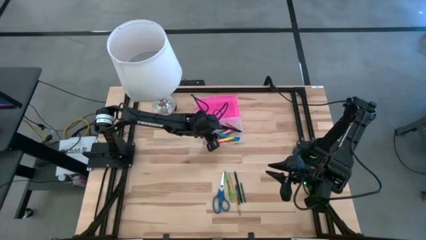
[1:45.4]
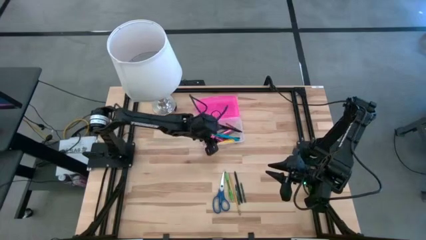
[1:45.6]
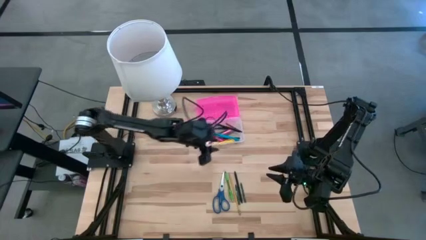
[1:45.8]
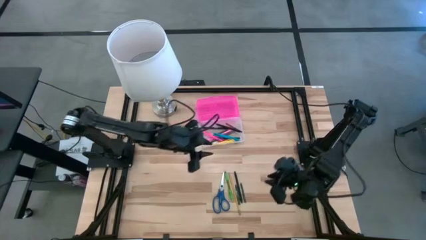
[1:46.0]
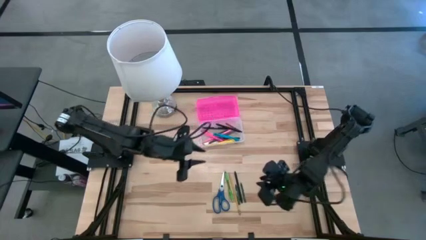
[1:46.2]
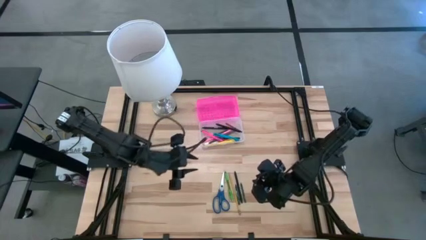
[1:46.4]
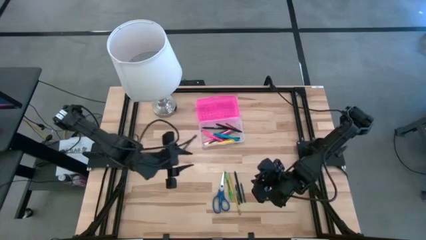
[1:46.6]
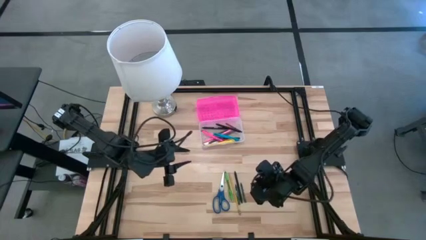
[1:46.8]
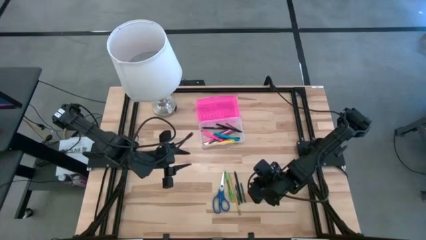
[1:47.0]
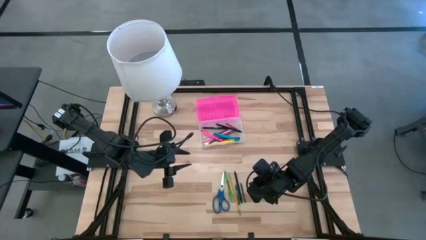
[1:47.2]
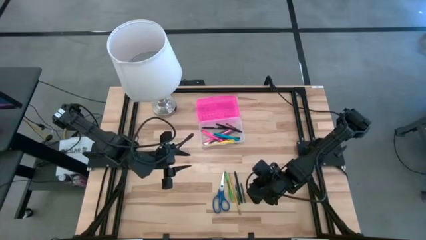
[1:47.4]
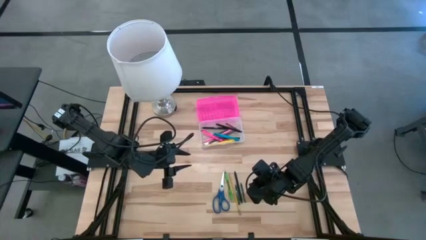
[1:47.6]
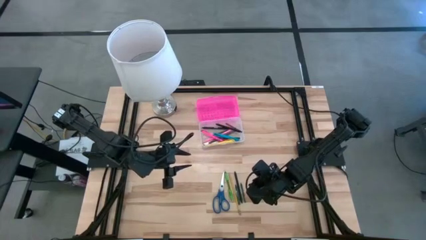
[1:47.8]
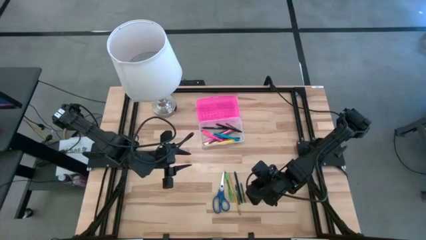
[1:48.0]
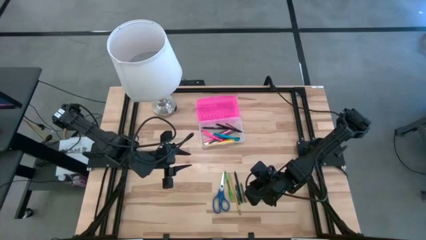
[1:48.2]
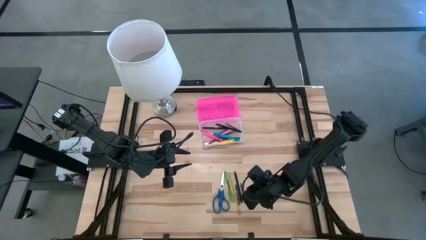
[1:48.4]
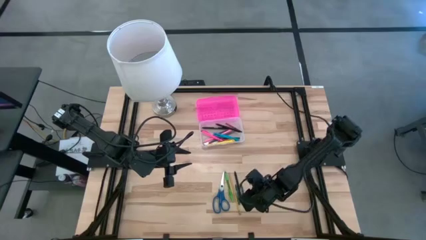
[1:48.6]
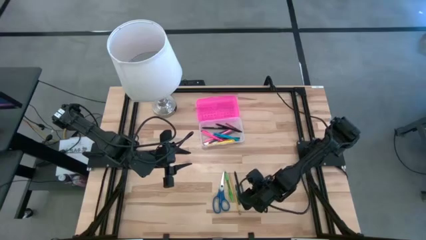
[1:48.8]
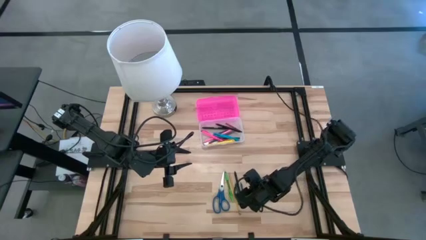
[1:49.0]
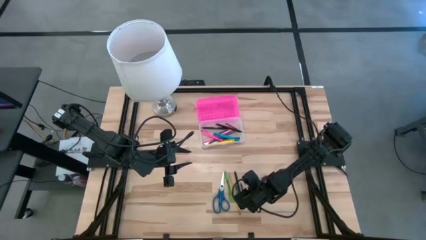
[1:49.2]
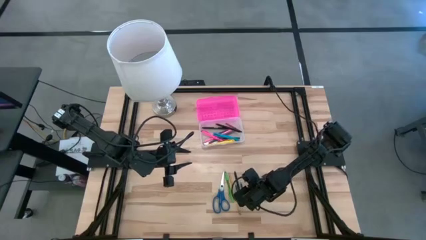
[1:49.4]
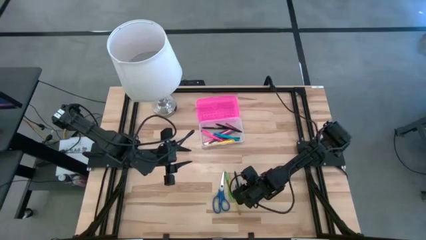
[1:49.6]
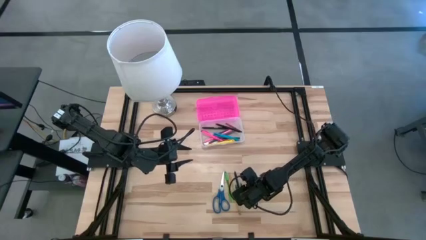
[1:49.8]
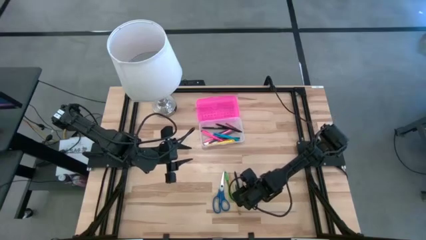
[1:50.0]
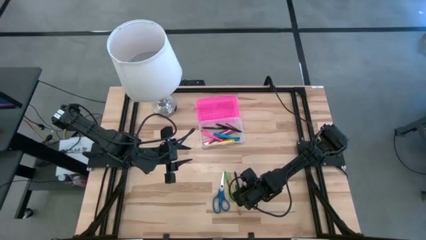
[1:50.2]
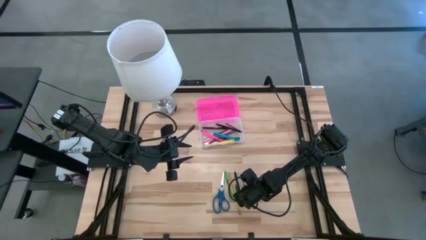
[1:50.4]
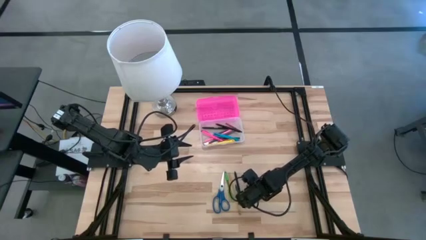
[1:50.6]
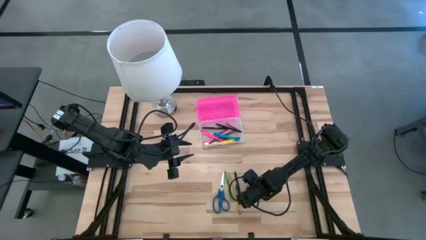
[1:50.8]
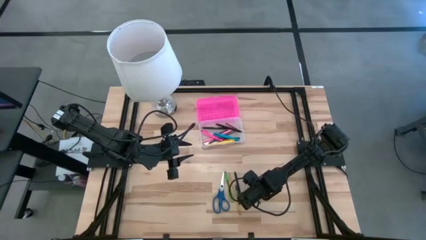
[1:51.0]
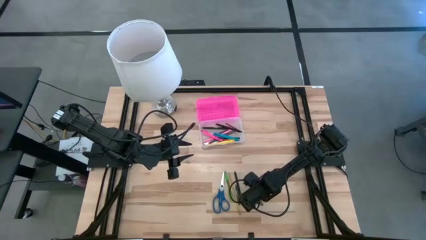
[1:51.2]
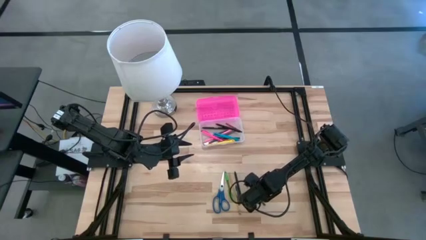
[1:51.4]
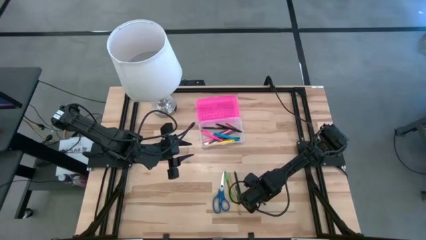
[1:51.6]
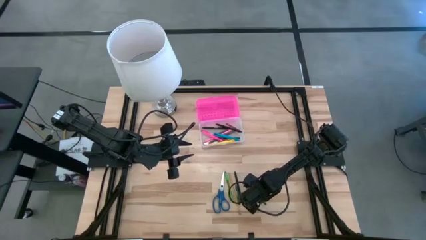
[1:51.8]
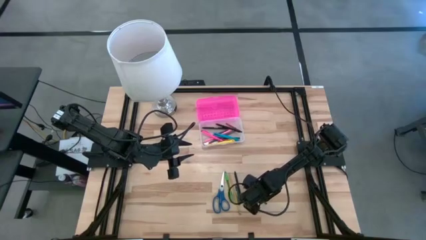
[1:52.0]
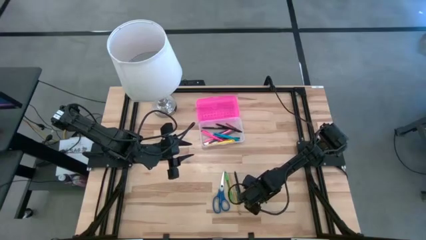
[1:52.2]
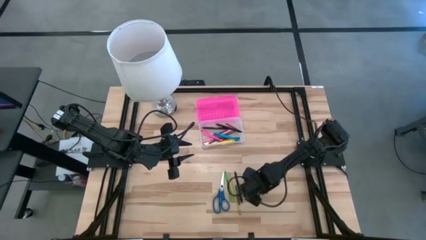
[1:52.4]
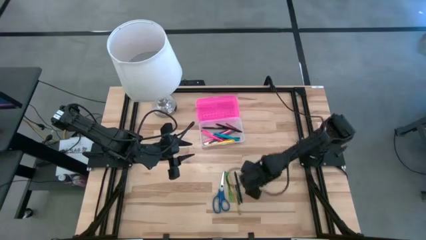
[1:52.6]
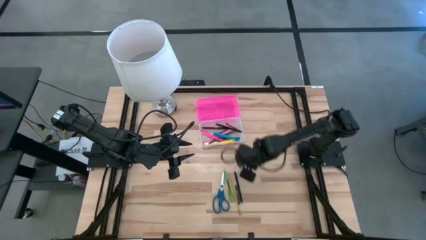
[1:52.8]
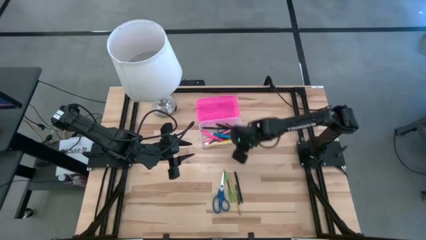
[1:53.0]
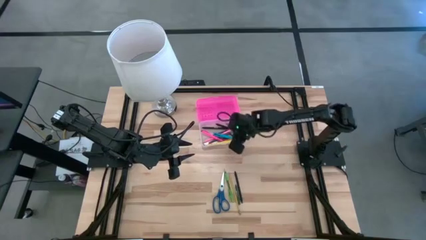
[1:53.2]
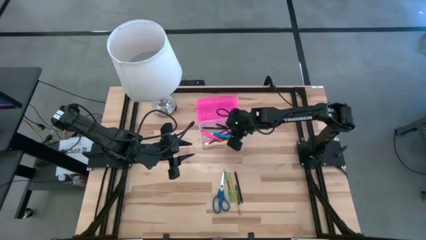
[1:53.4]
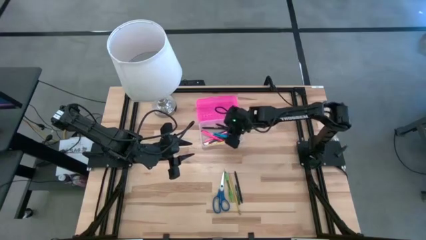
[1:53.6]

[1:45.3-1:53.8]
Task: Pick & place school supplies into a supply box
Put the right green crayon into the pink supply box

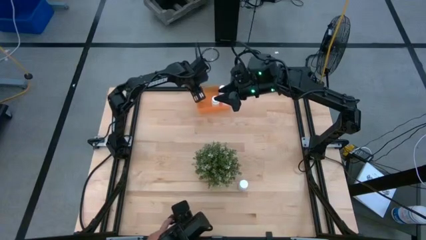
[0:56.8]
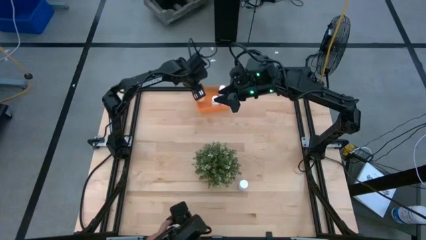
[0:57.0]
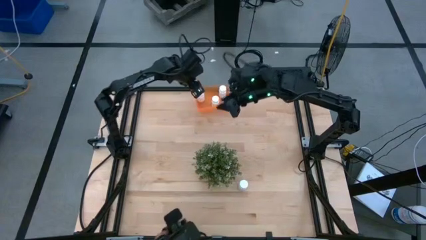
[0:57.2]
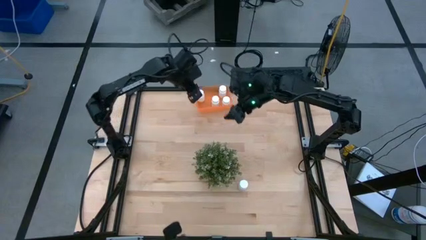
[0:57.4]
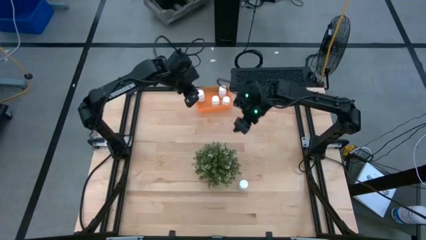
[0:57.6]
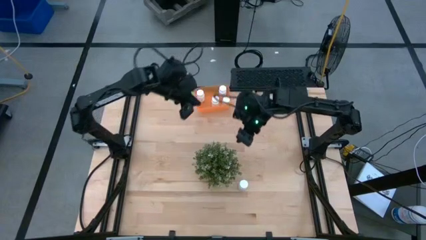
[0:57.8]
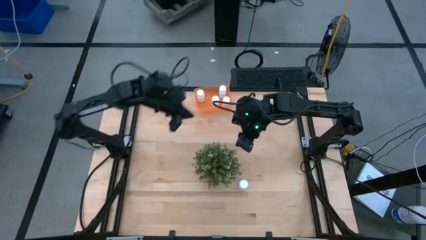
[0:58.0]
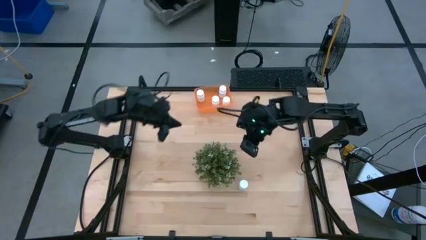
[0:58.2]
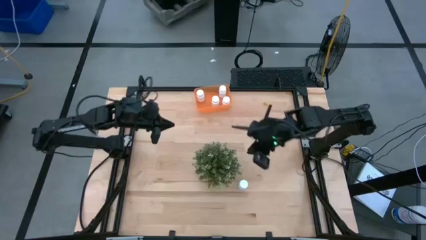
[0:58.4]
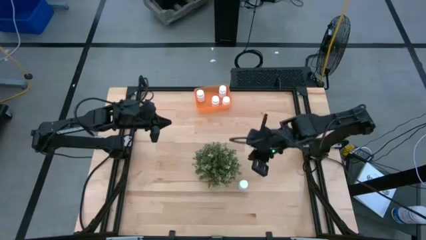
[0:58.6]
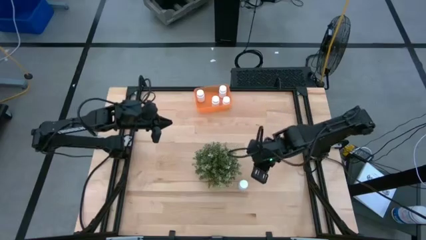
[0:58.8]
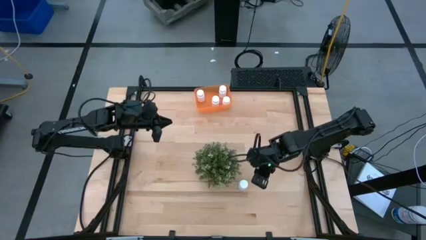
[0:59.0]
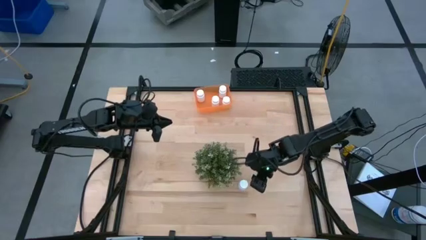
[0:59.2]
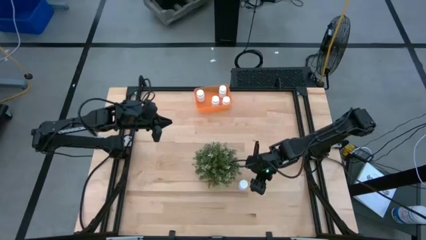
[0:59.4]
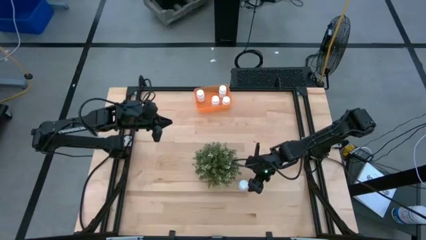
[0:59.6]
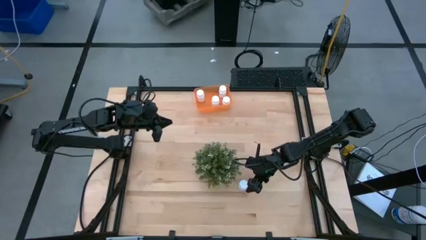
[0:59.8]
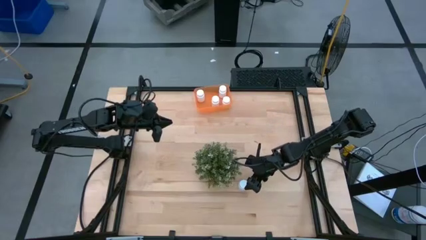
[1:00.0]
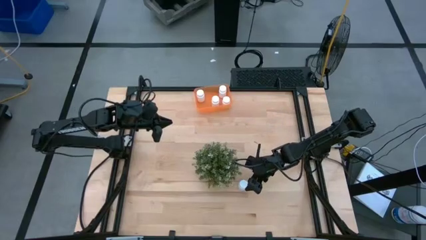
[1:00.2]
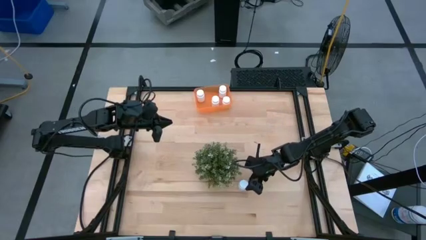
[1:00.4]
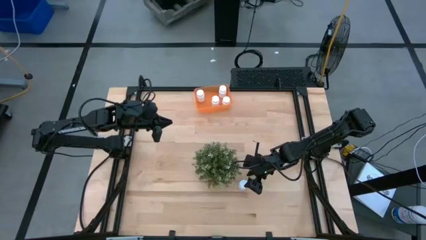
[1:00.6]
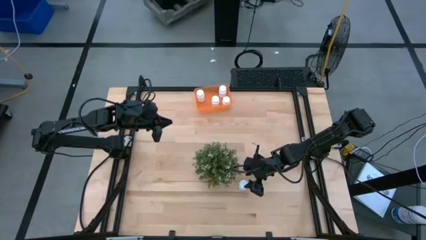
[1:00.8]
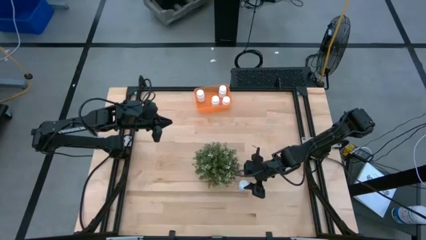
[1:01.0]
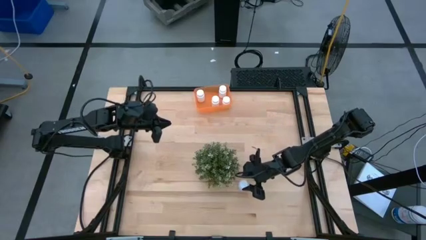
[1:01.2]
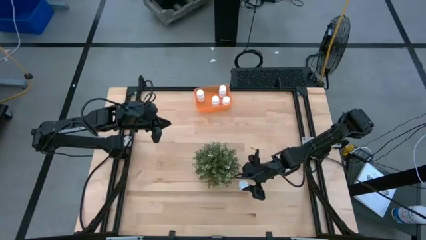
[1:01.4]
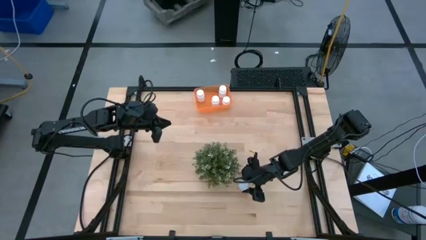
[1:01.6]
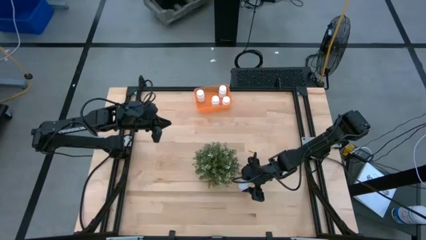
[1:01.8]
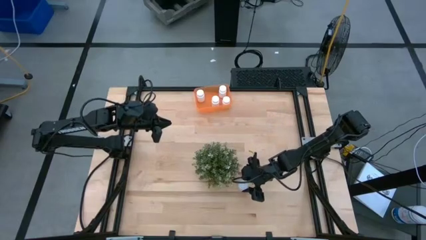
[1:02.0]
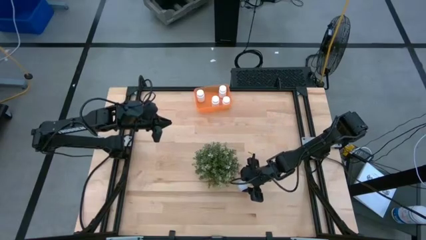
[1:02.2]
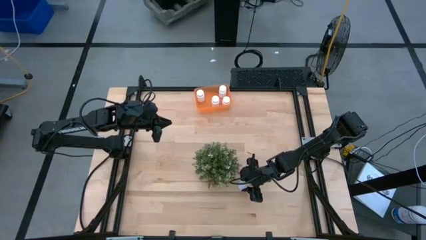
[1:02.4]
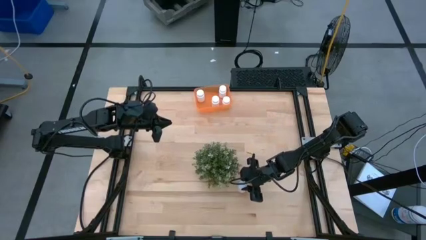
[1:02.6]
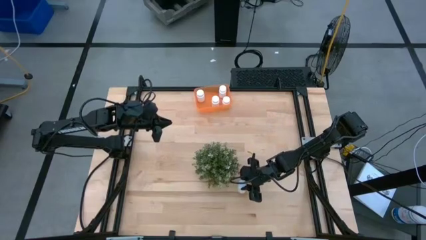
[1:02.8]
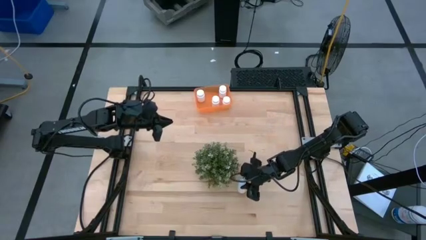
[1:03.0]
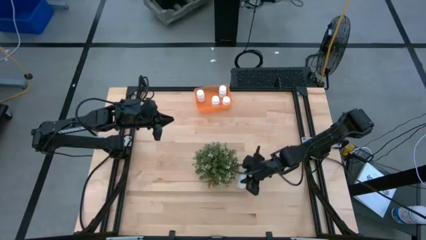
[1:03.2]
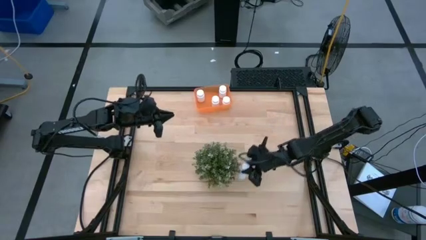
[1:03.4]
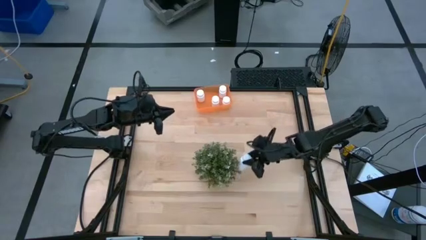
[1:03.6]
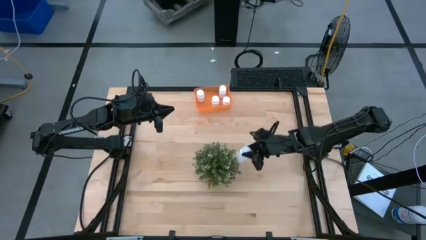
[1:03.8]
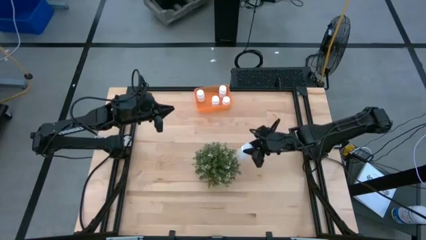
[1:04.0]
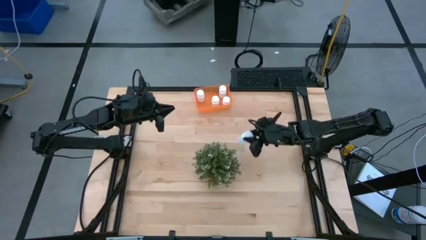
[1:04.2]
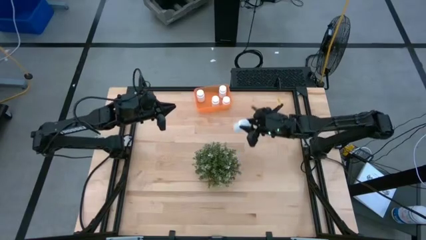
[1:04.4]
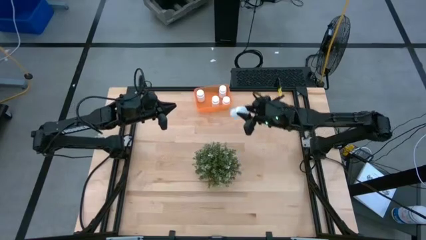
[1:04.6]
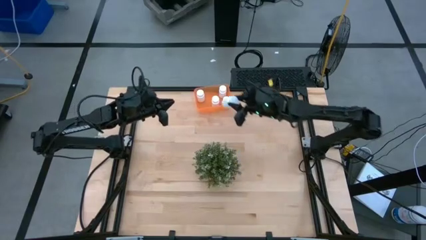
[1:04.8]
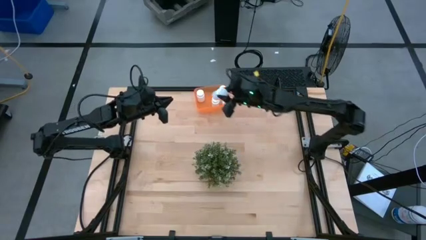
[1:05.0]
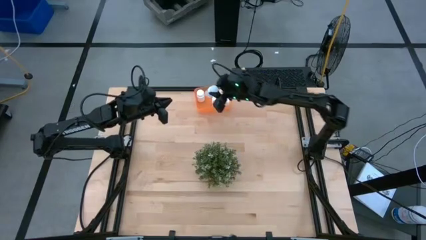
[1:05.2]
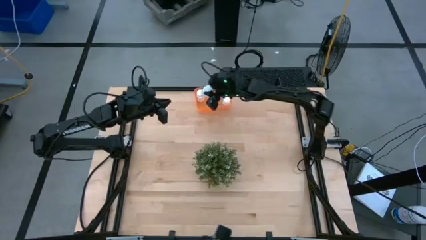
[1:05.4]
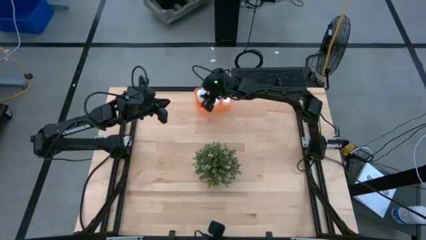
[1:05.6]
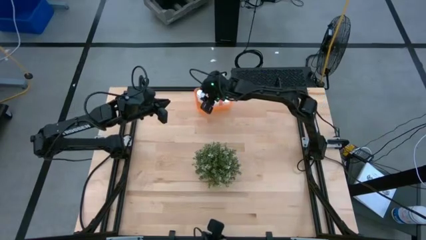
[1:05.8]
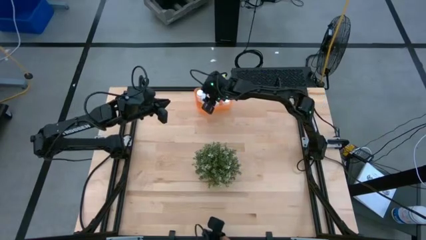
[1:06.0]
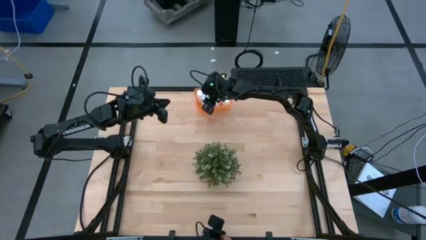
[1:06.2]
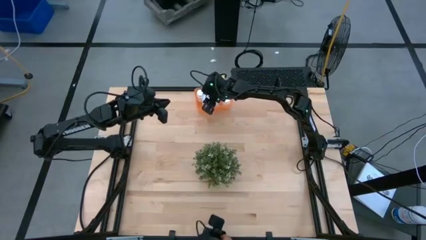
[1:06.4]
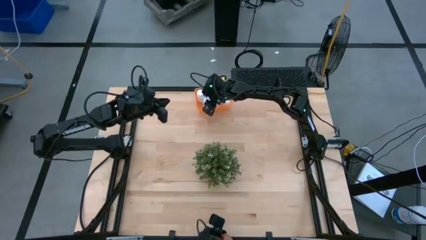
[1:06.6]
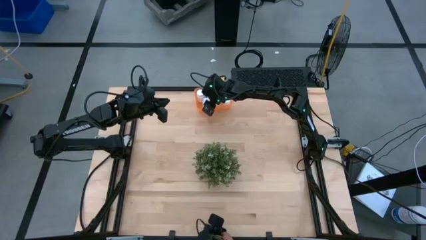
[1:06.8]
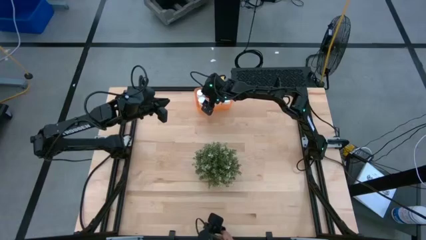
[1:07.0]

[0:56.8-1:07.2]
Task: Pick and place pill bottles into a basket
Put the white pill bottle into the orange bin
